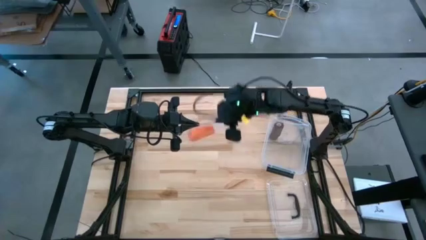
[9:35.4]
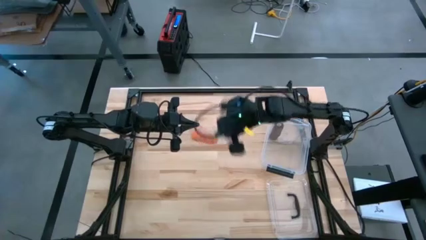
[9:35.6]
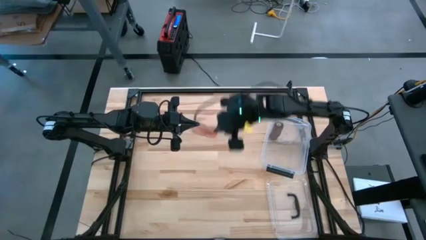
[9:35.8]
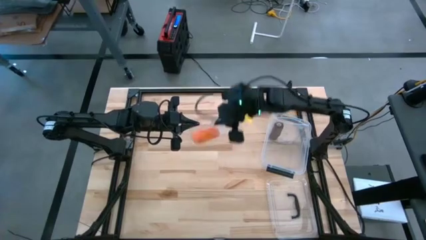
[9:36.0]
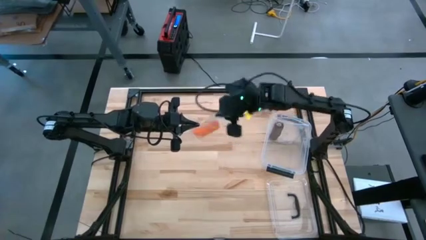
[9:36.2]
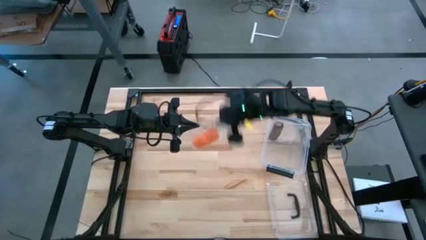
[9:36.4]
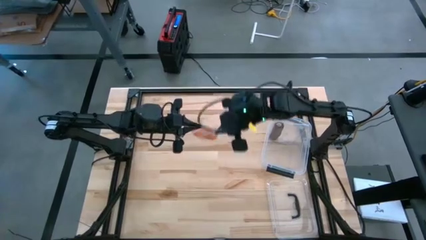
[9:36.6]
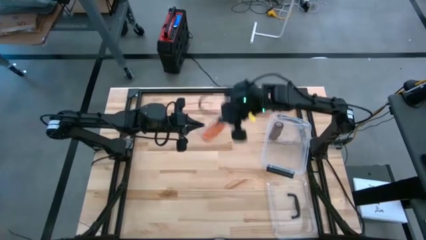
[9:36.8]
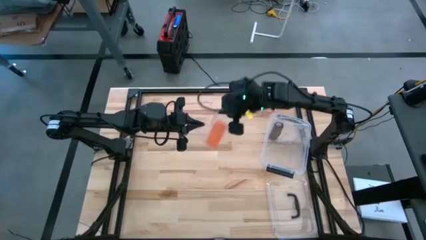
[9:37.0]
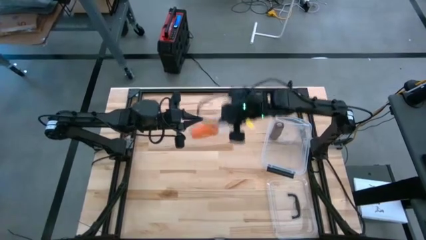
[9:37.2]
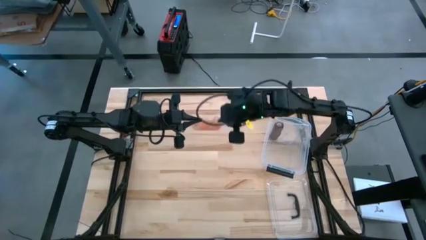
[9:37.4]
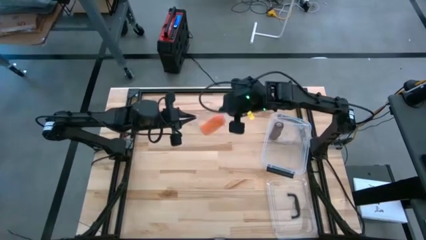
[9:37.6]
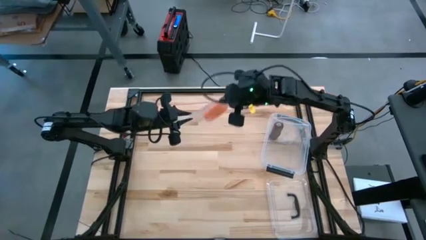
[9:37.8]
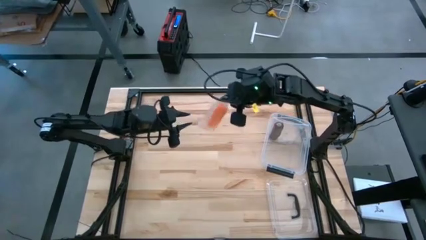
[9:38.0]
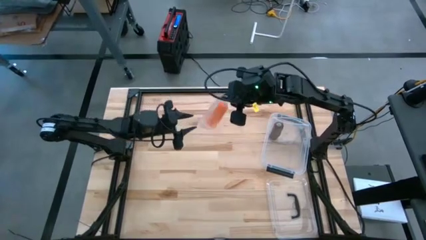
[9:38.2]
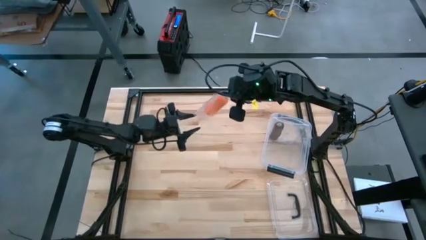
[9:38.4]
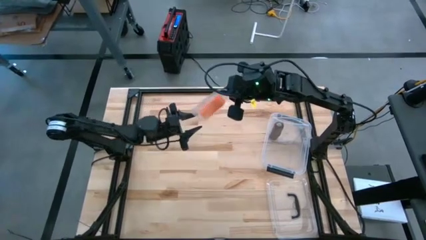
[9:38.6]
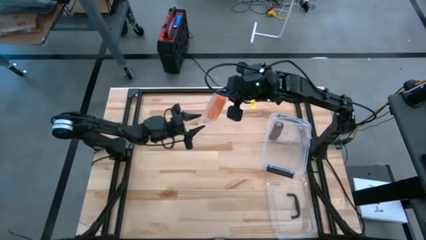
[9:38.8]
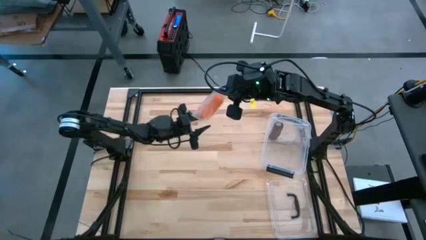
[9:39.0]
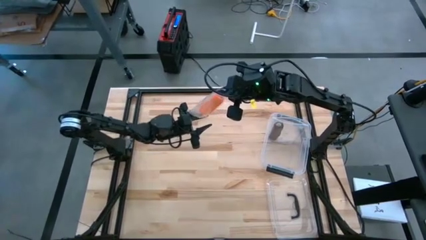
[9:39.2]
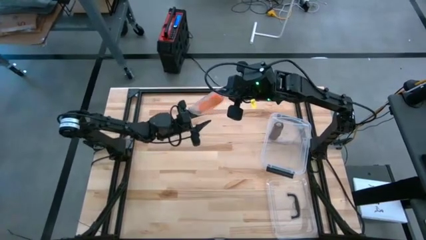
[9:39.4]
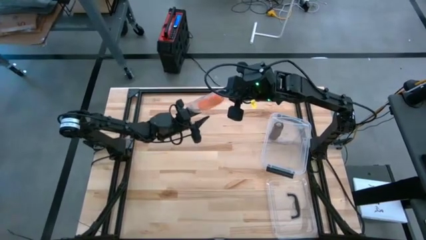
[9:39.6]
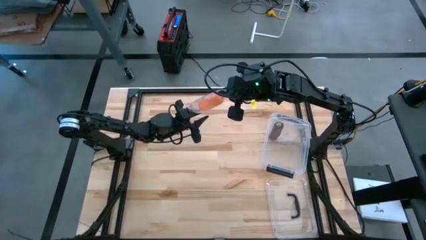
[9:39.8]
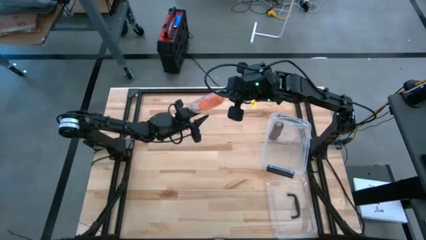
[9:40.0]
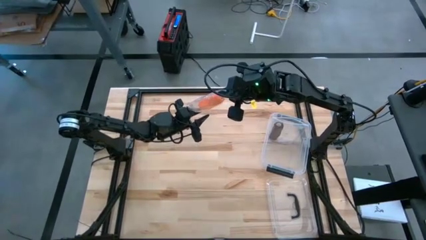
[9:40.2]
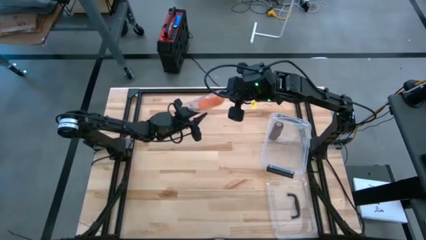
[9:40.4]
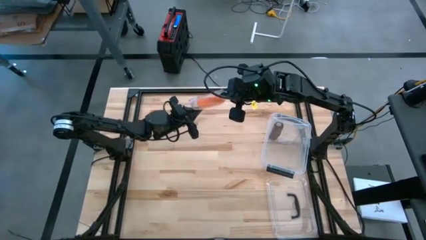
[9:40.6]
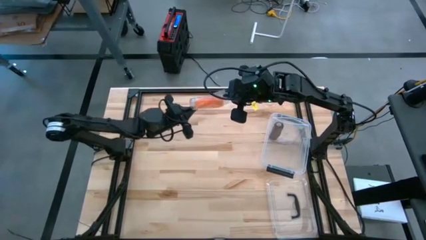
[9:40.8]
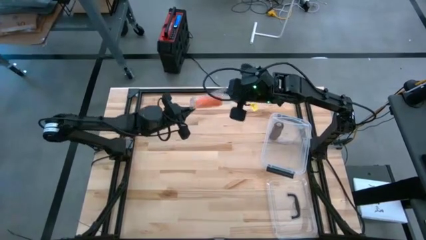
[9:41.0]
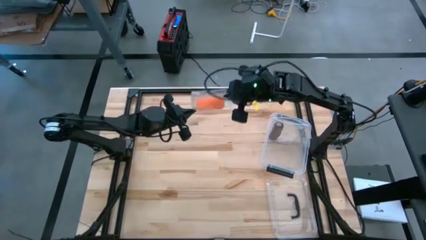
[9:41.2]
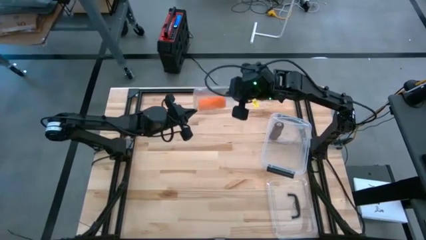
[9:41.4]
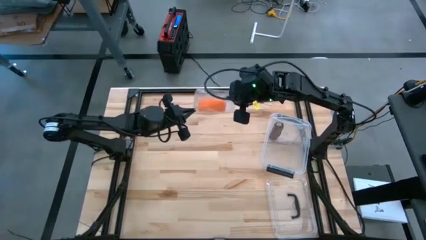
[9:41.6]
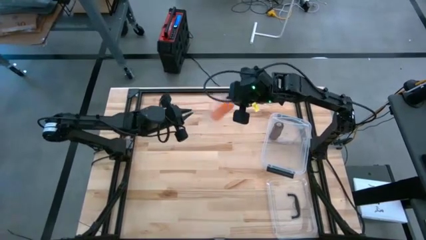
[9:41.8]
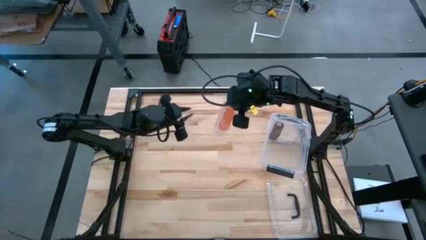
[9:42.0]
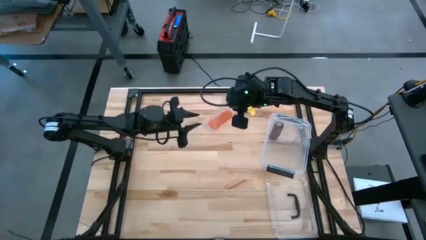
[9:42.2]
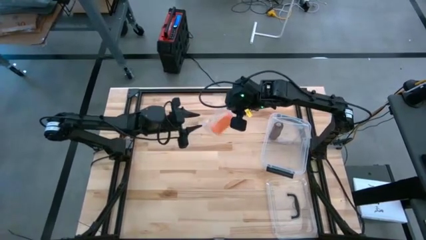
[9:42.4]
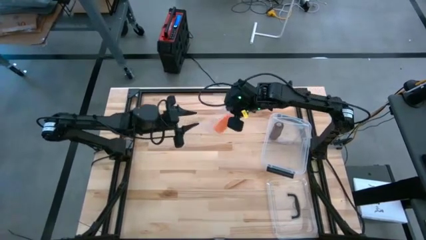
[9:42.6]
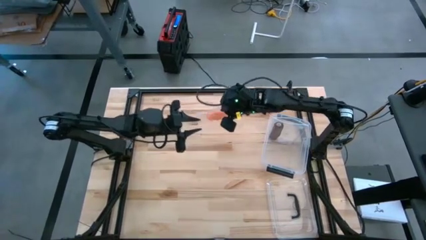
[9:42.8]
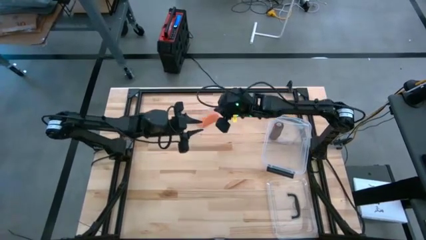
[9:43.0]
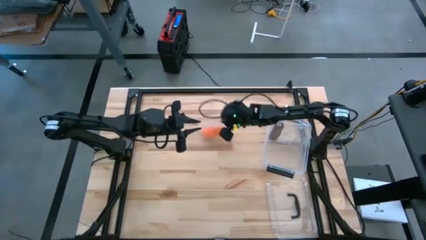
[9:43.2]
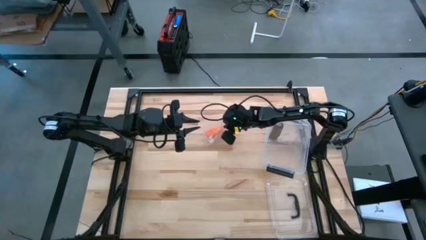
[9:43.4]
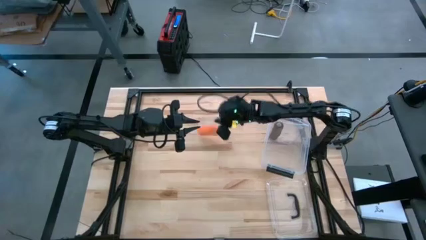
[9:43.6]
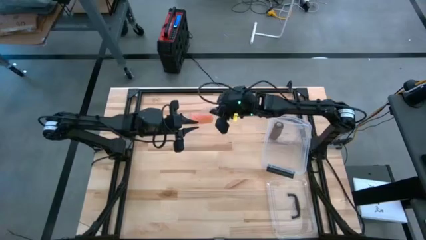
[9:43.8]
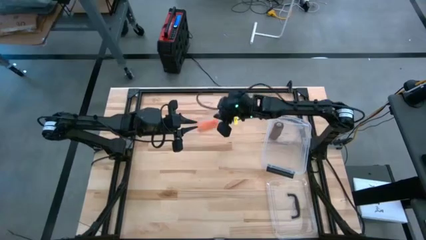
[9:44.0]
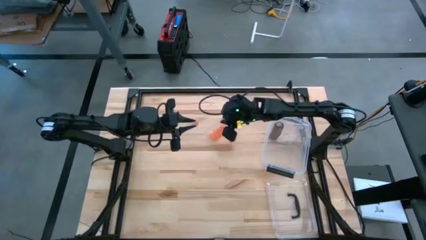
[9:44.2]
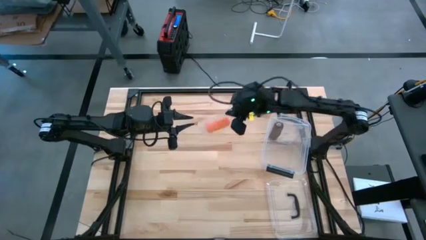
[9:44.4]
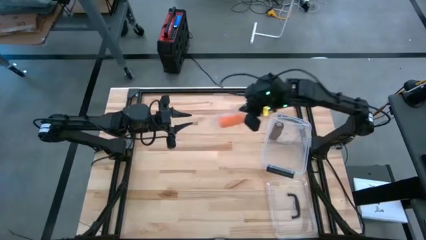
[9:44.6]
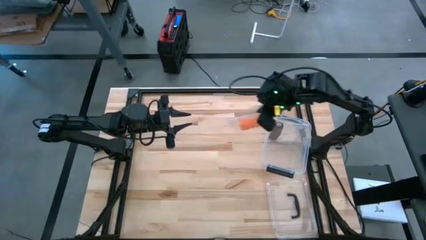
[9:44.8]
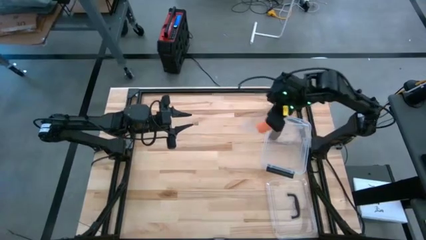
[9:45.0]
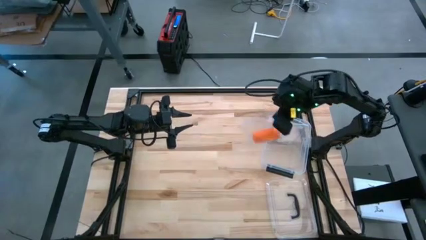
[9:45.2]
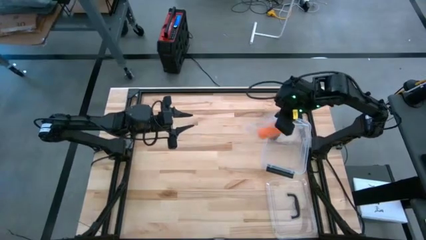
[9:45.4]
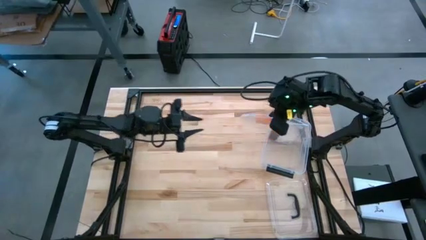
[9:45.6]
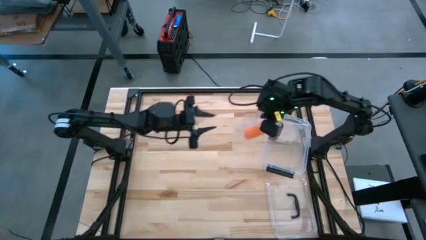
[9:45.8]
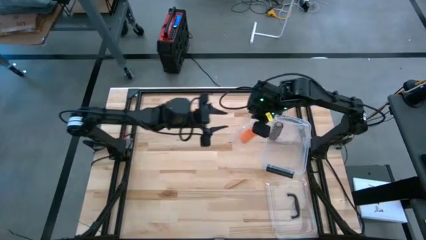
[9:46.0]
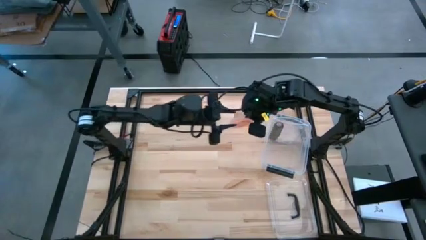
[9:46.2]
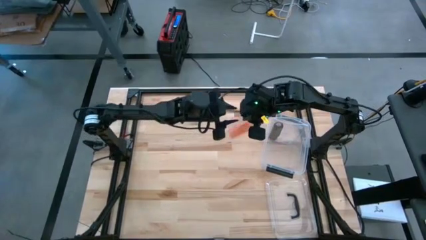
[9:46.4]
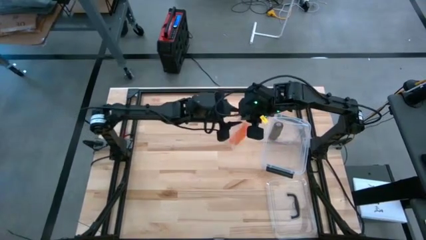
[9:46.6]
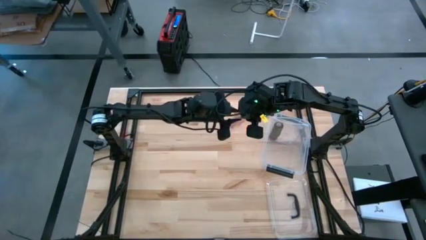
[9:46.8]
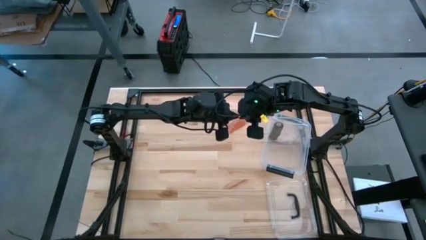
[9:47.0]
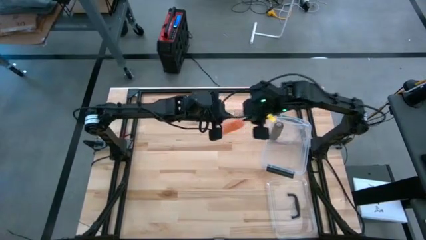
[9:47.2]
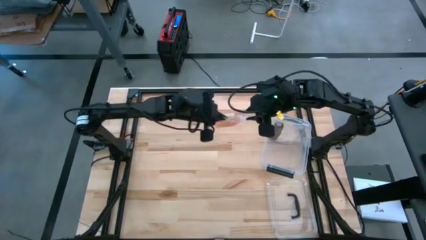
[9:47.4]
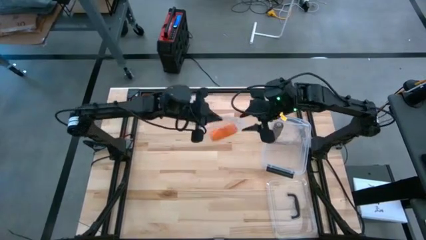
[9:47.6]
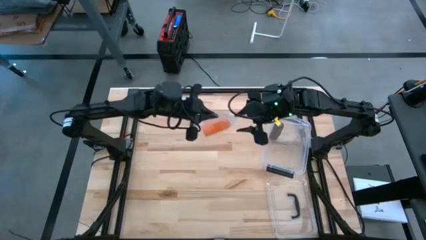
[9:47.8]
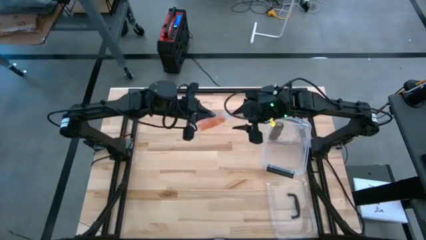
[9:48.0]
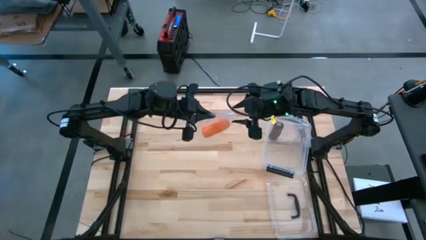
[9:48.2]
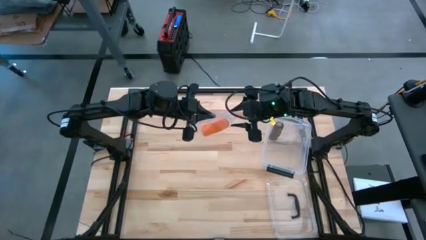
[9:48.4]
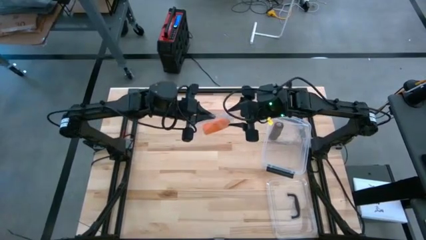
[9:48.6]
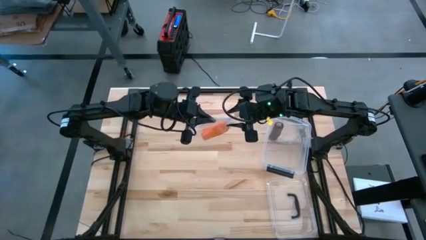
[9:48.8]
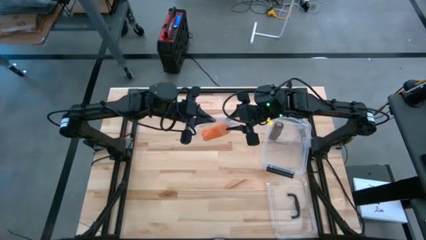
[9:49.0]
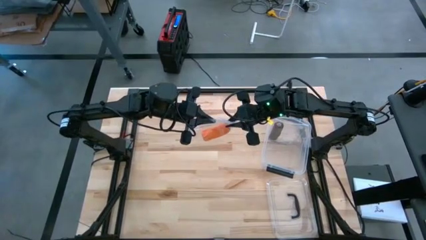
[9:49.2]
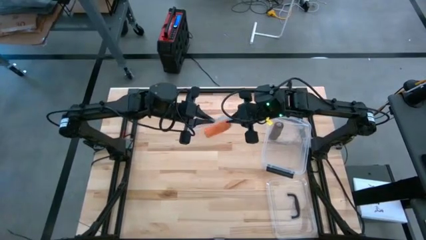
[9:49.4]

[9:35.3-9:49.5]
Task: Roll bandage
Put the rolled orange bandage into the transparent zip bag

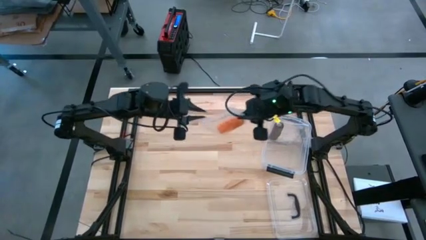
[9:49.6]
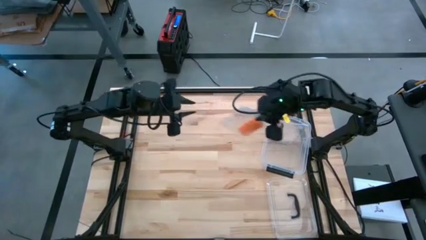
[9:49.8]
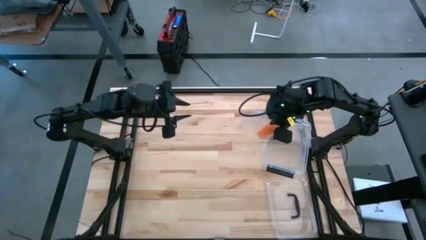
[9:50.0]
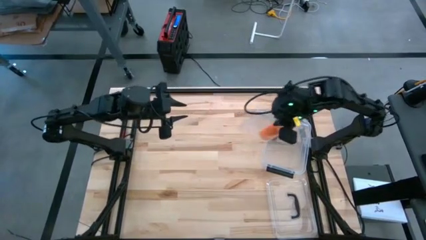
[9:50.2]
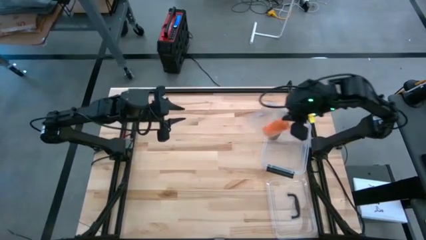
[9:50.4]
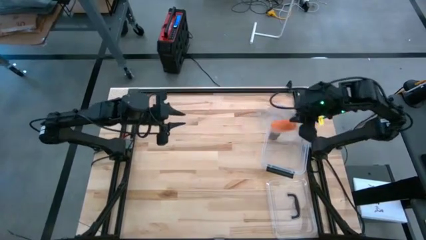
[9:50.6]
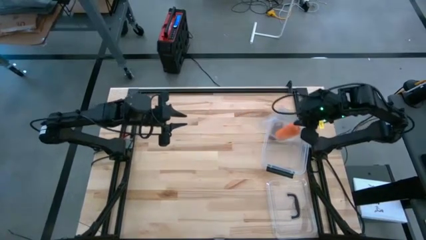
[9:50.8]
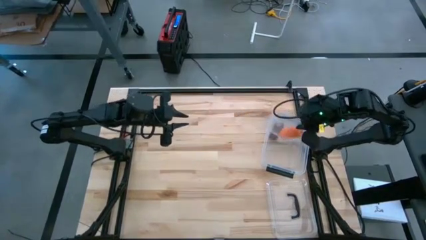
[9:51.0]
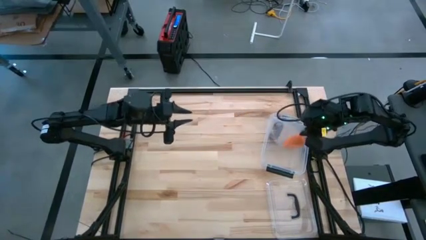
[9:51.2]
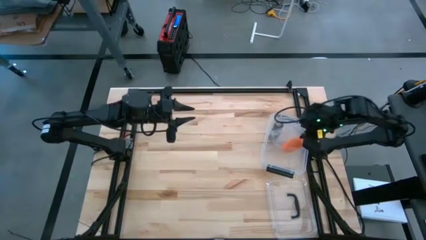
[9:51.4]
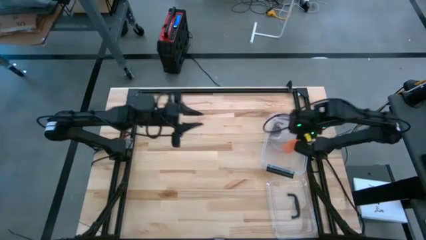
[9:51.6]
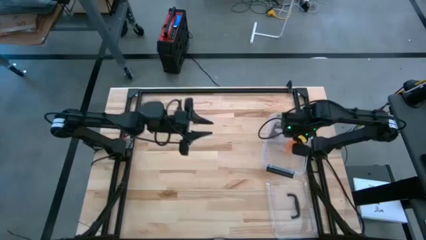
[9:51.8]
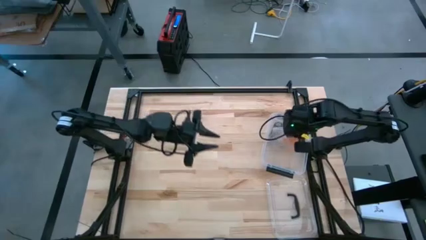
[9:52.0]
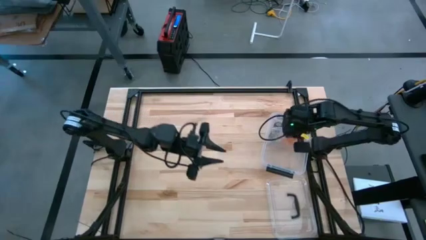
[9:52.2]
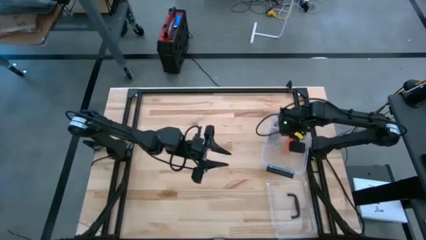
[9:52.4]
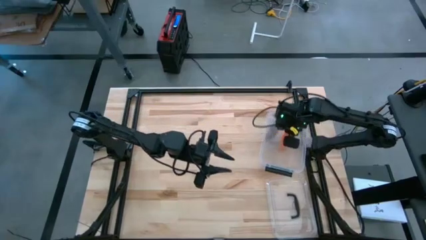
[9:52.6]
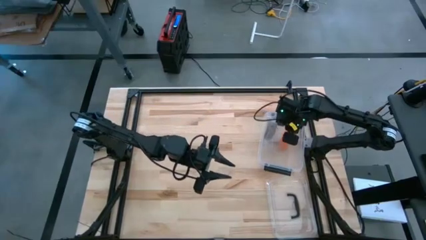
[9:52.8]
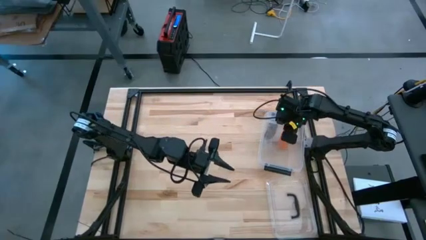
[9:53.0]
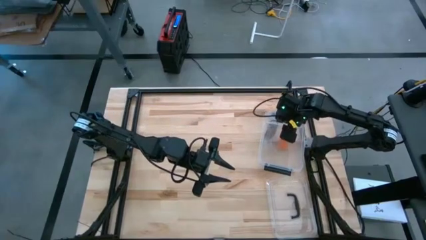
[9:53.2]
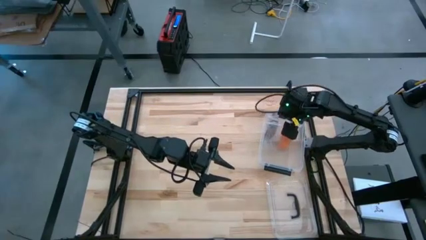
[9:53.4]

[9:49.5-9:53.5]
Put the transparent zip bag into the transparent container
